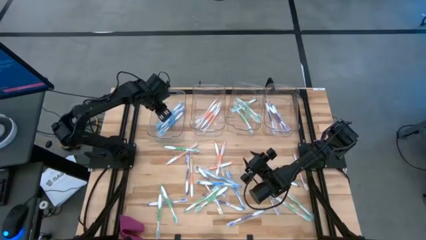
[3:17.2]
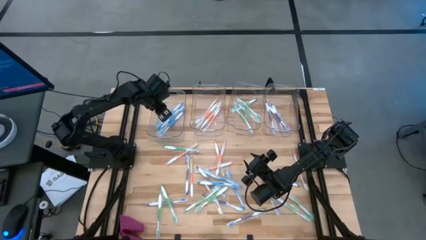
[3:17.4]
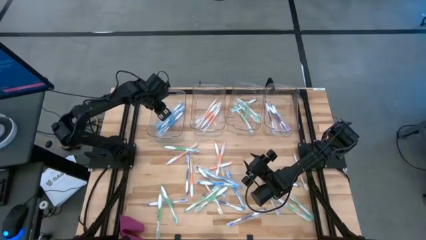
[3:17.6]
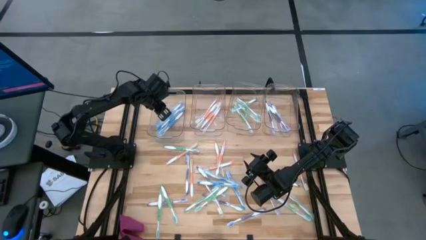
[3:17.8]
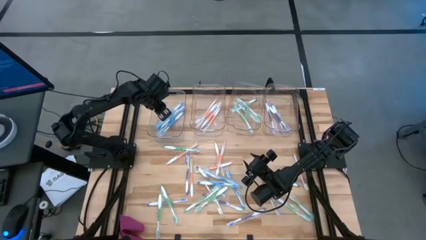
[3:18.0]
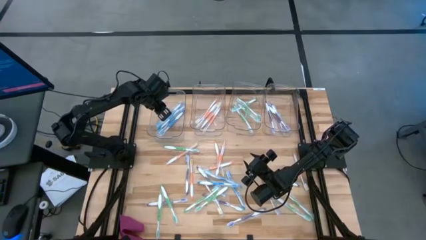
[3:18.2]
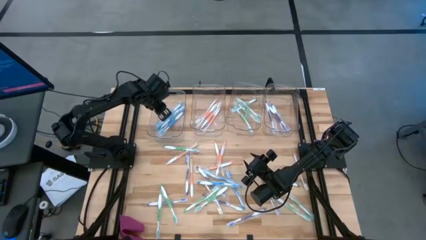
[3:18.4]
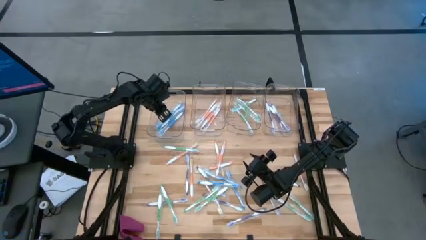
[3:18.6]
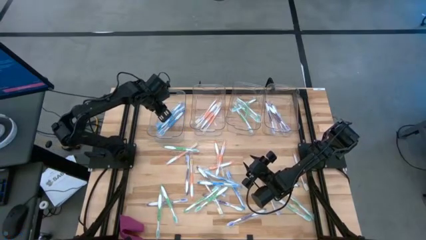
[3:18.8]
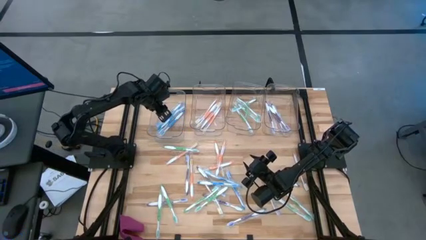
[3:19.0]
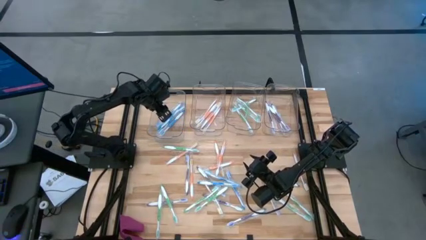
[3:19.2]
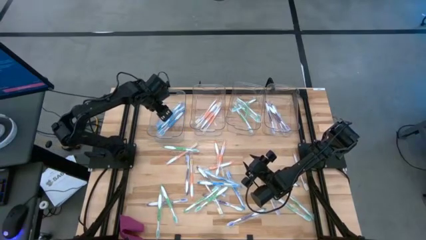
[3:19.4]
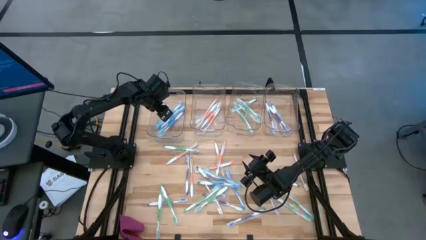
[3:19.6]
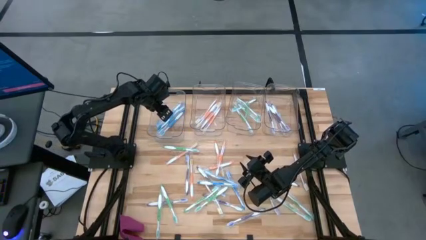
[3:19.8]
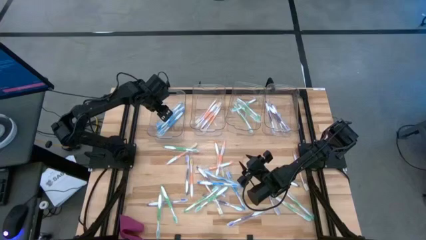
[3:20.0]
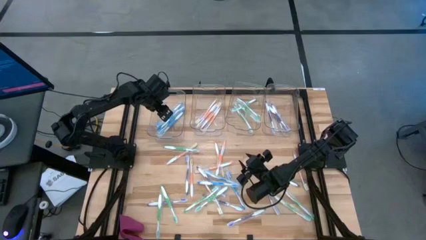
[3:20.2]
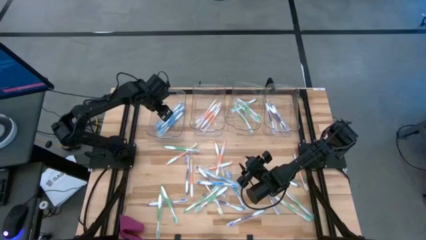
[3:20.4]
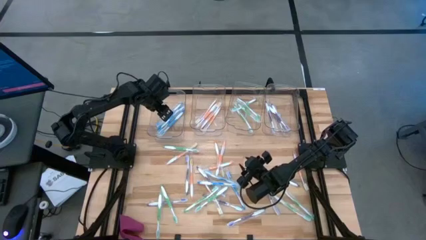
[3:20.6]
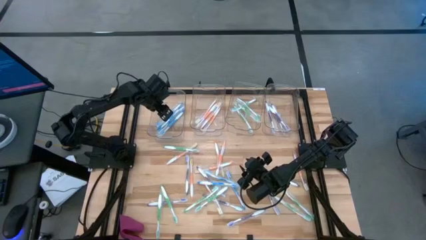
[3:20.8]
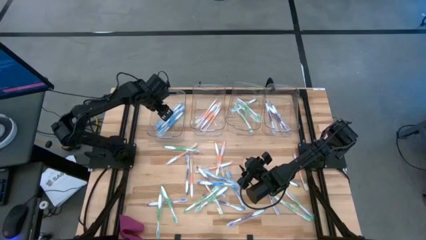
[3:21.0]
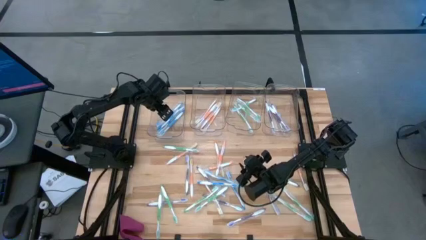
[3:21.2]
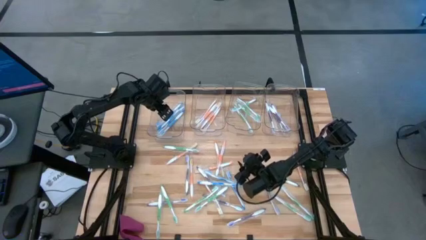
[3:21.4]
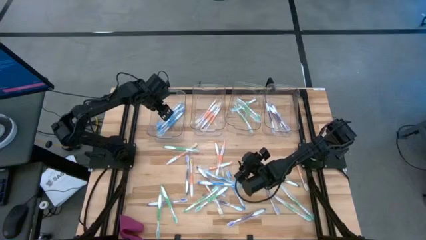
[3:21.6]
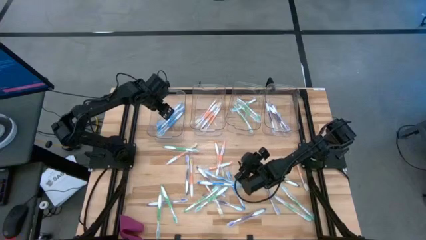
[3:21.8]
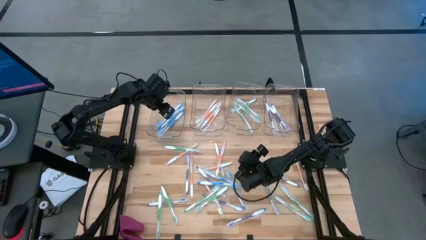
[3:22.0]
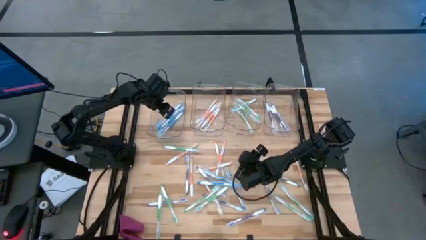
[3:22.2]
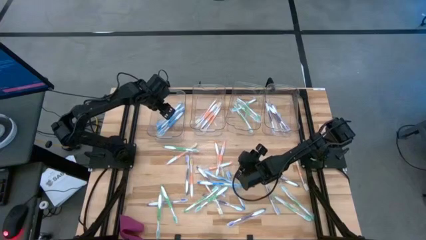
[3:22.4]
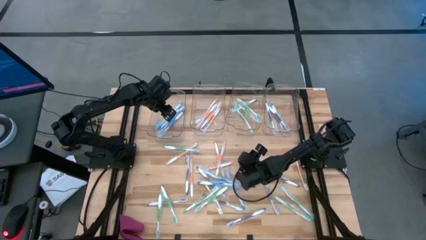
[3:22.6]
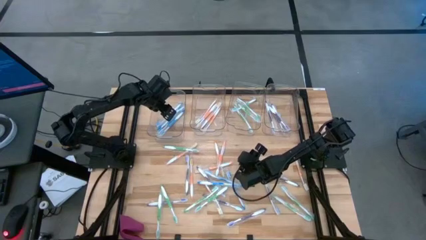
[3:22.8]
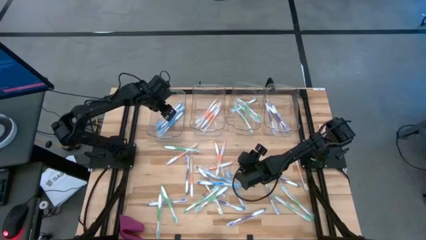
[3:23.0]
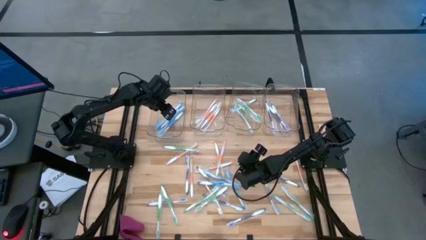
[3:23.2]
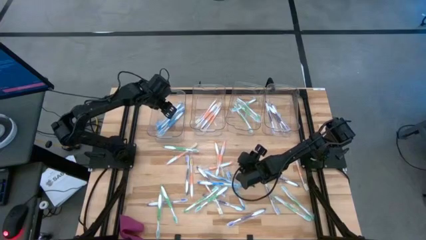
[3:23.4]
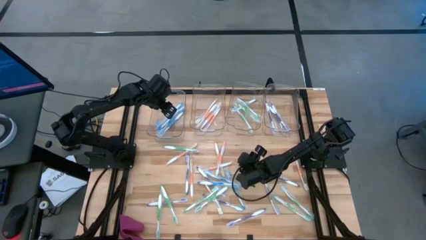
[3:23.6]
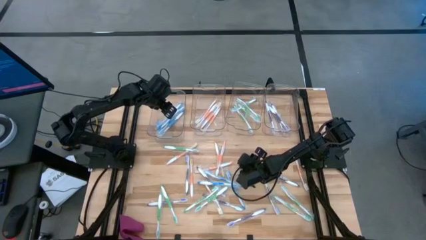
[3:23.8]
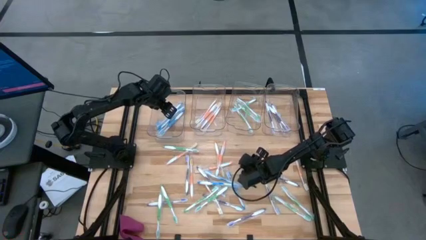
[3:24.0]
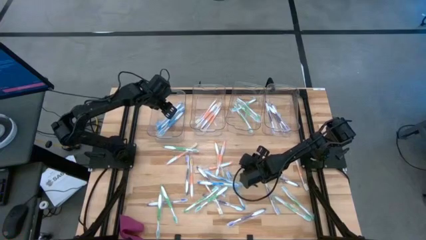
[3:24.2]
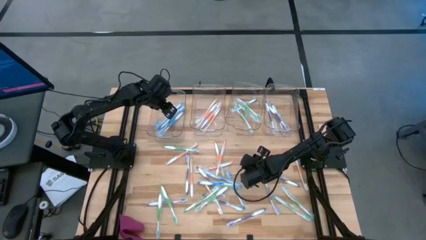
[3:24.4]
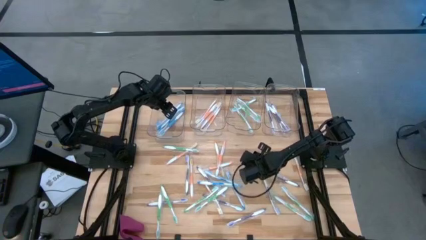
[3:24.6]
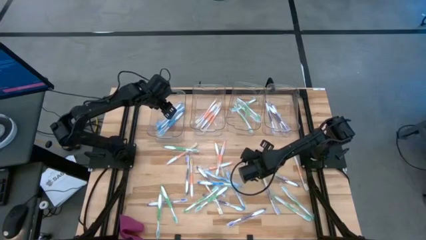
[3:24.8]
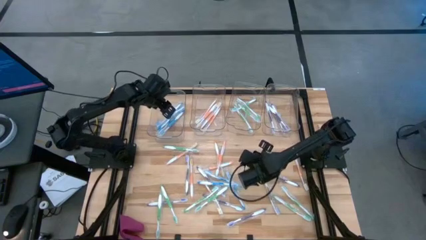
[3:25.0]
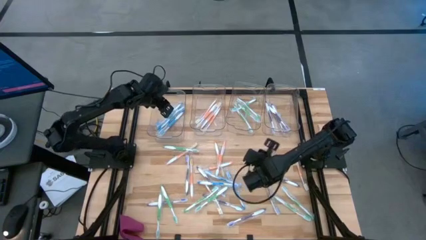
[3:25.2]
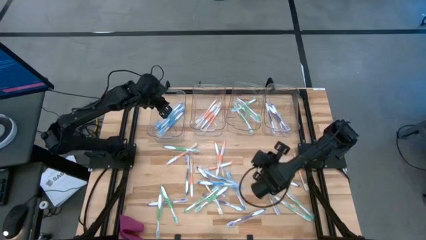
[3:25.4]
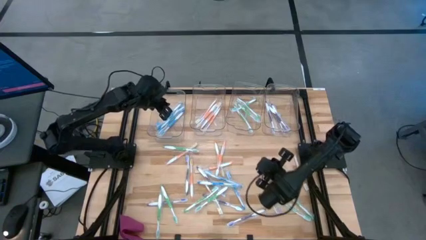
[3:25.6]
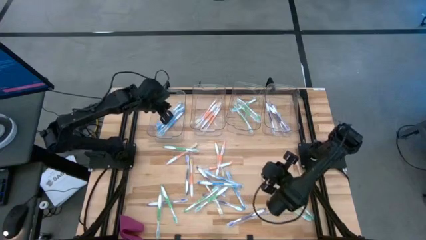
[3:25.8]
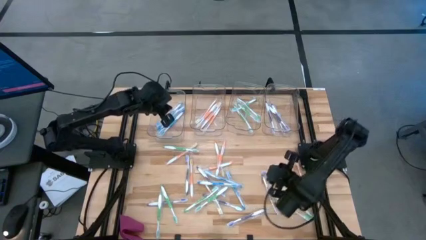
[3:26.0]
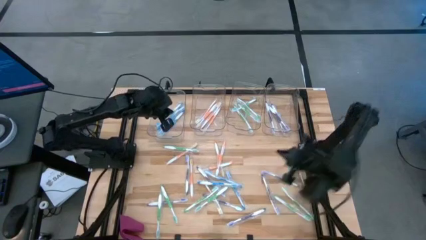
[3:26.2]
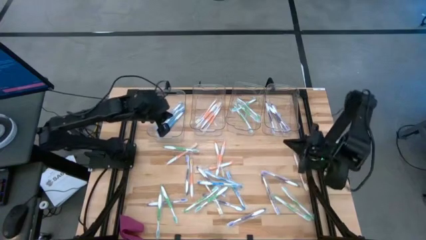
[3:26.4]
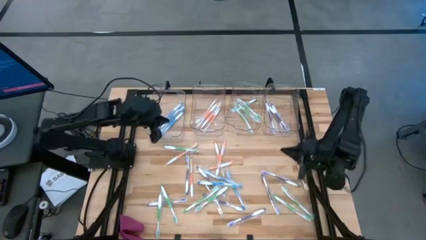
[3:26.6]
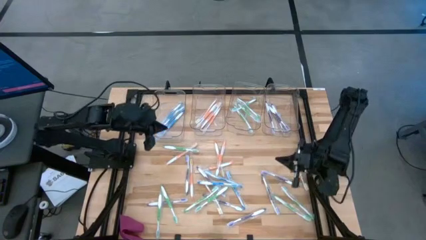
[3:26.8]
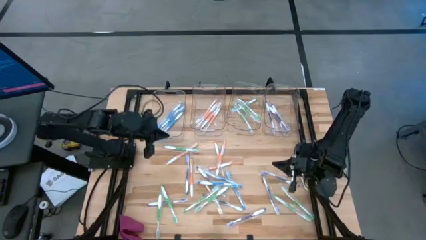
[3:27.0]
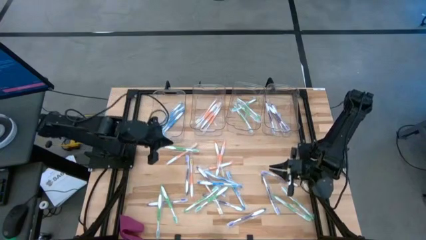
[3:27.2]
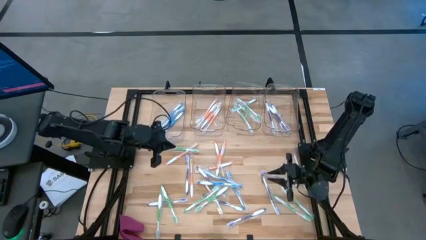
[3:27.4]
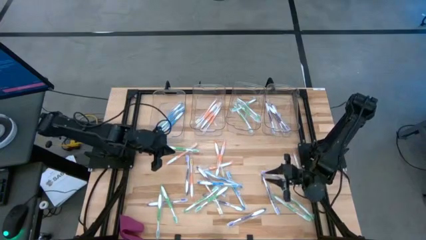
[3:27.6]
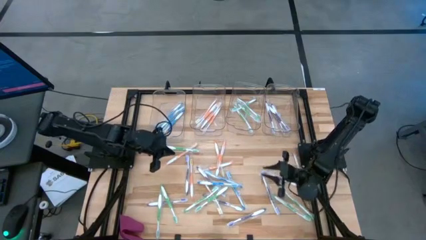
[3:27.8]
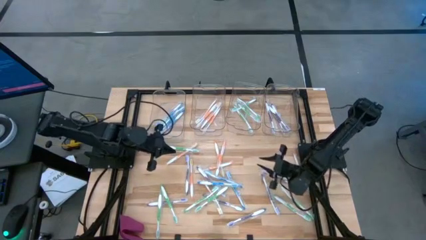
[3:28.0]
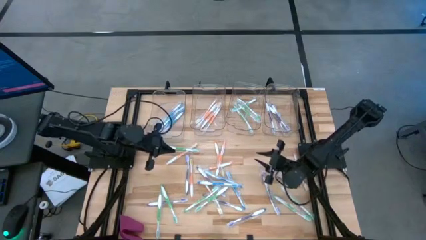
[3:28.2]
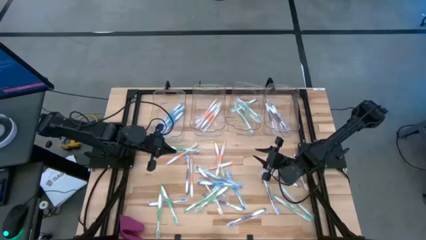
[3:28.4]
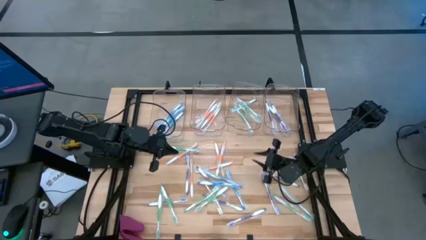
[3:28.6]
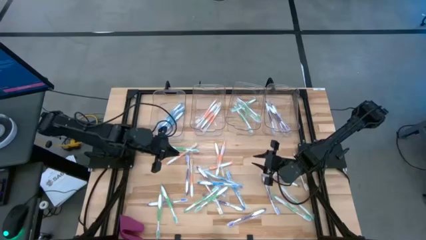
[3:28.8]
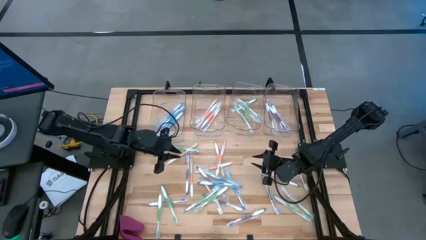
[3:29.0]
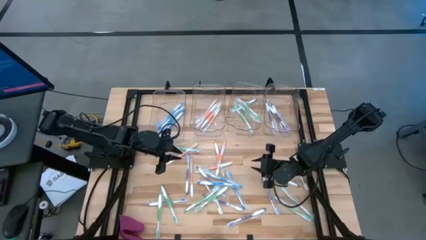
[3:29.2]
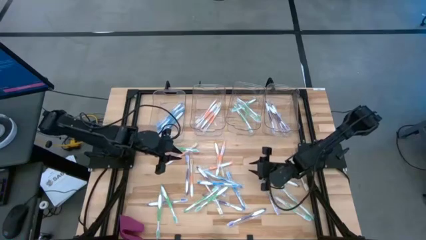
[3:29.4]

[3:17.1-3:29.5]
Task: Pick & Place Toothbrushes
Put the orange toothbrush into the middle left transparent bin

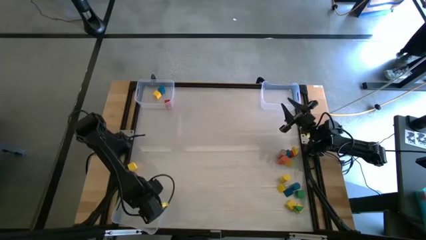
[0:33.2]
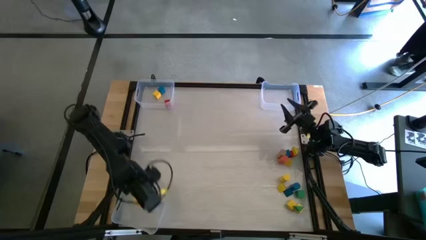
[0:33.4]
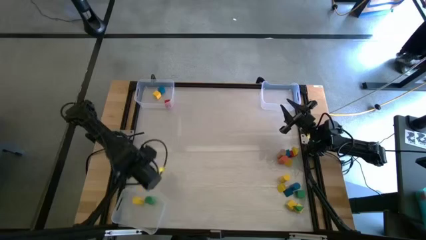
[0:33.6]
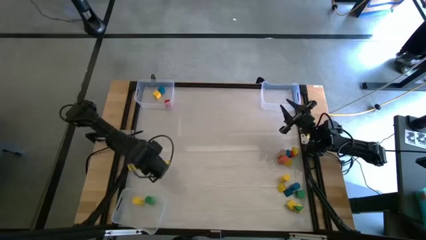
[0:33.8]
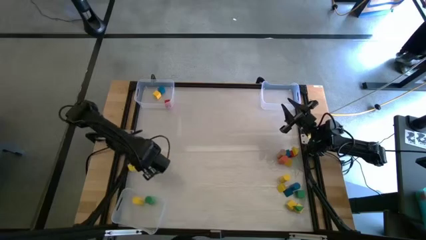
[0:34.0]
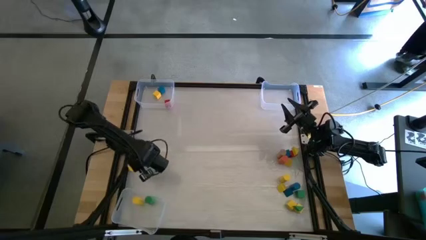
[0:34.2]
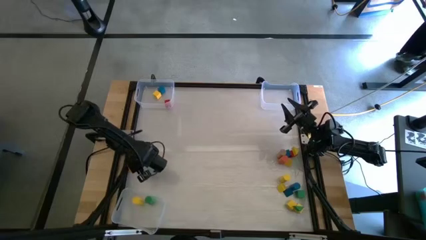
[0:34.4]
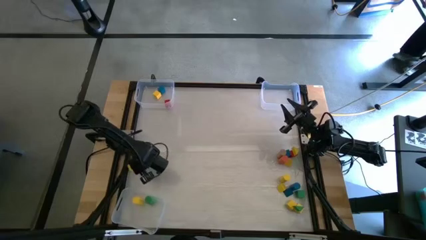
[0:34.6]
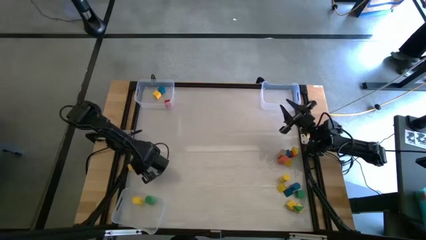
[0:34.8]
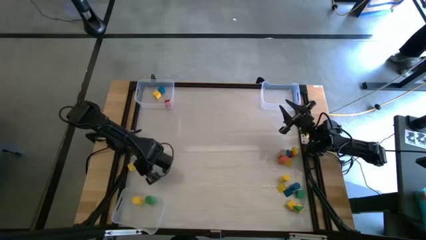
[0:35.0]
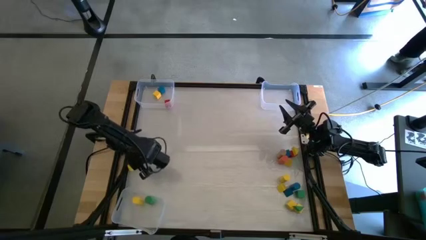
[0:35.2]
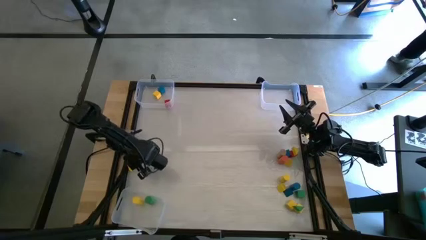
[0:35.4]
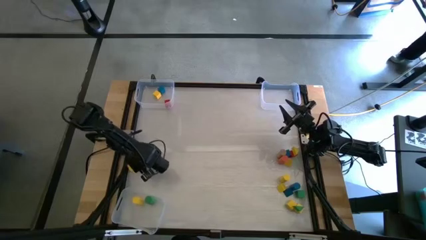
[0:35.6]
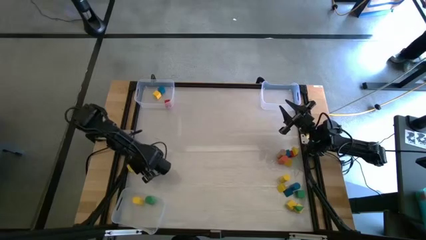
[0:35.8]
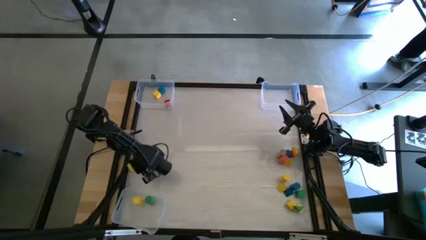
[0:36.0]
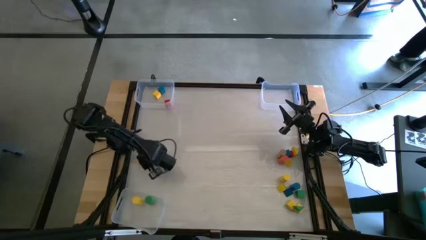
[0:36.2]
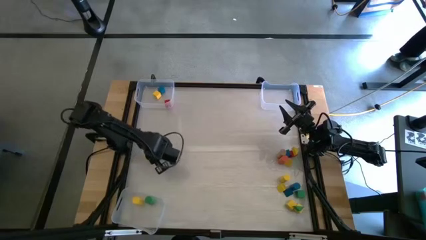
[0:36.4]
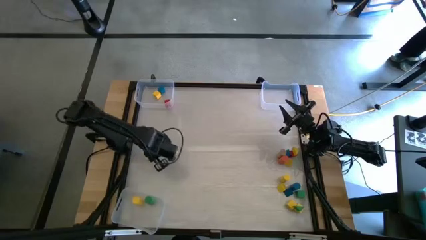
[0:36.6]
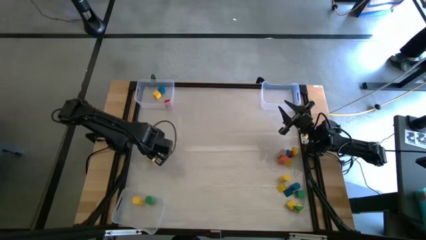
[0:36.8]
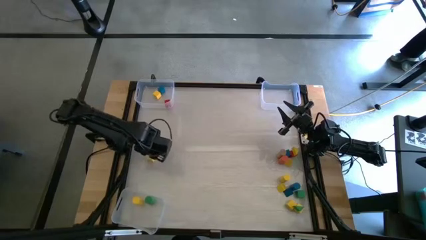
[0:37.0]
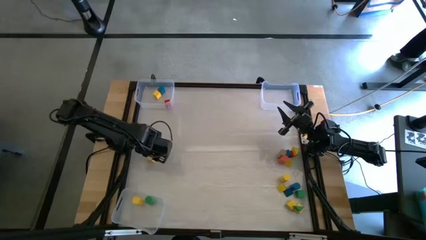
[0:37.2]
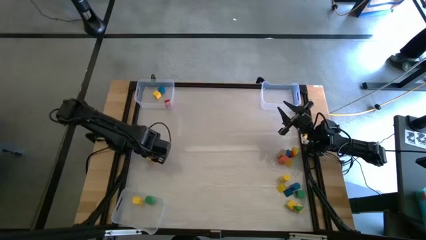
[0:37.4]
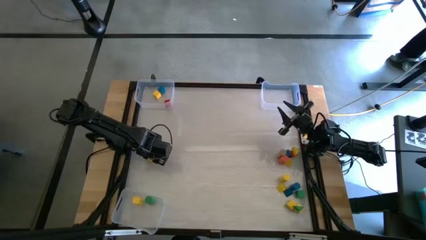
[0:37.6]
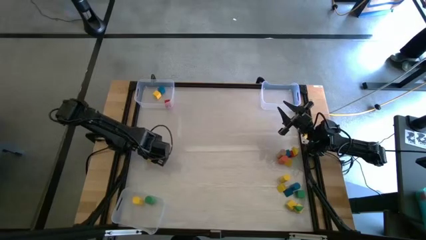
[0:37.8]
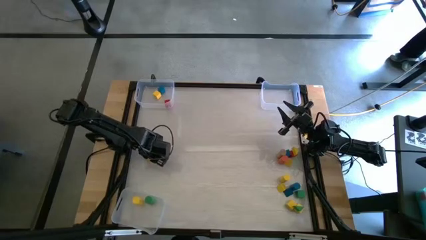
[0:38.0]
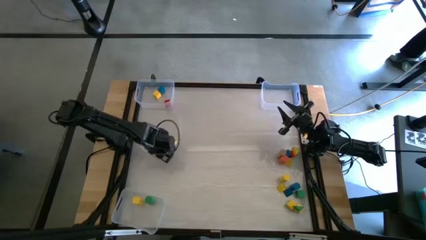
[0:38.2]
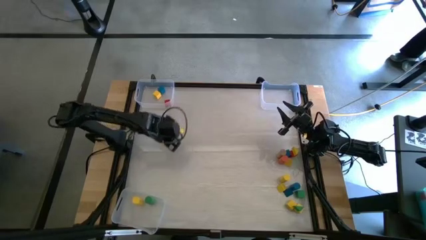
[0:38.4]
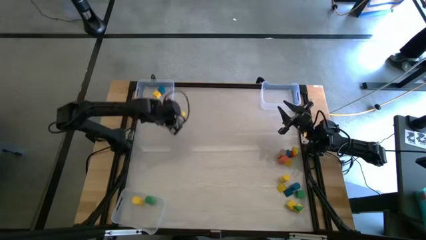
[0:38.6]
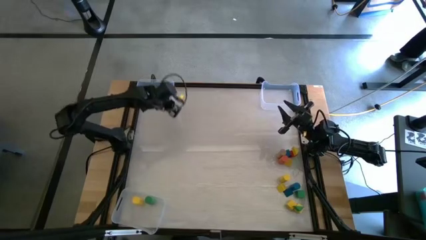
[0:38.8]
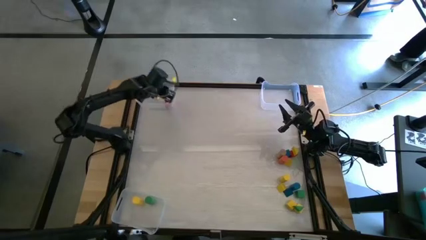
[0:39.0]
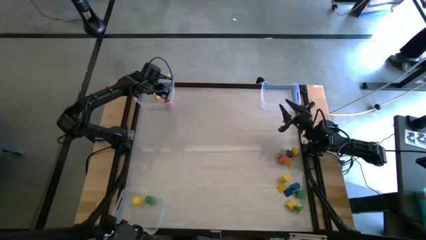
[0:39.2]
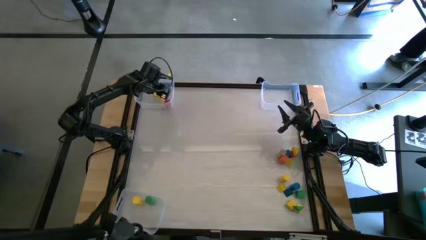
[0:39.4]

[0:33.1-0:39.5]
Task: Sort blocks by size
Put the left yellow cube block into the top left transparent bin
